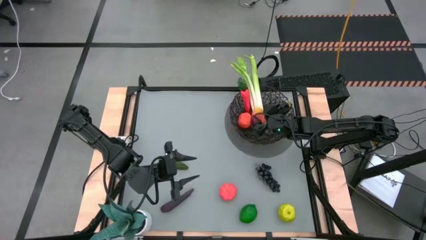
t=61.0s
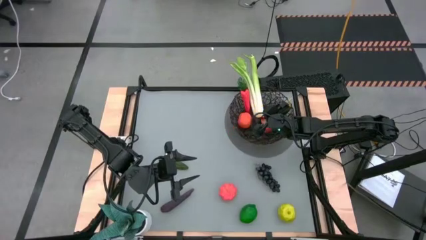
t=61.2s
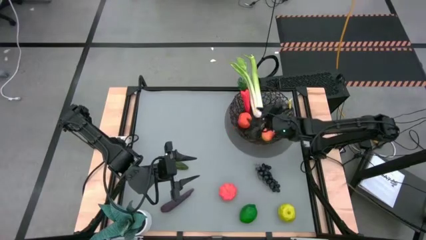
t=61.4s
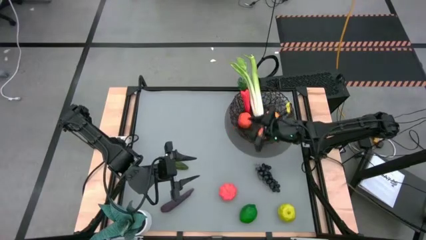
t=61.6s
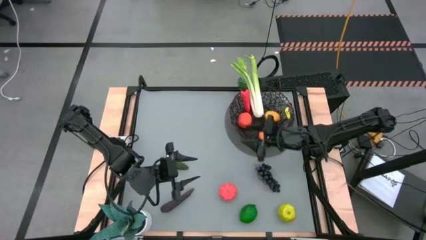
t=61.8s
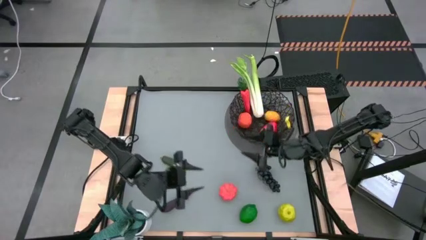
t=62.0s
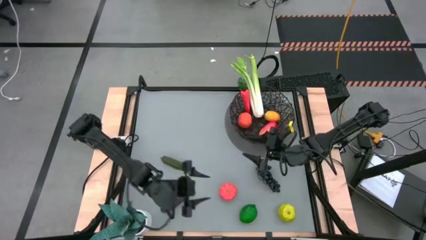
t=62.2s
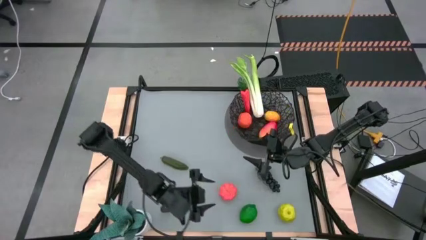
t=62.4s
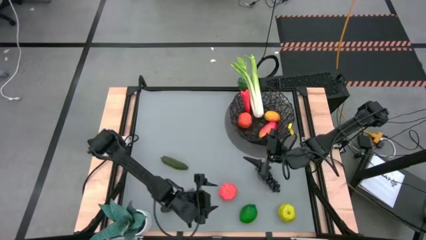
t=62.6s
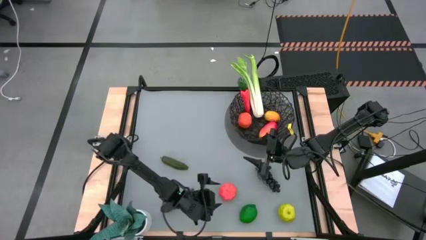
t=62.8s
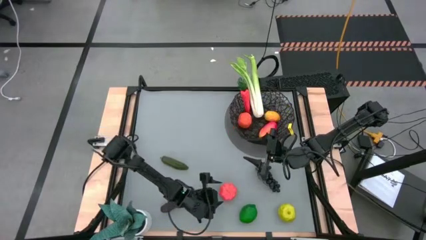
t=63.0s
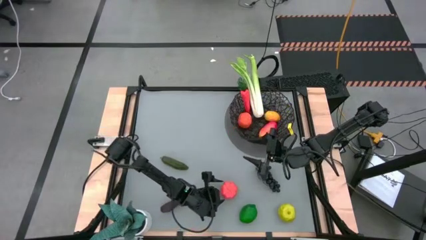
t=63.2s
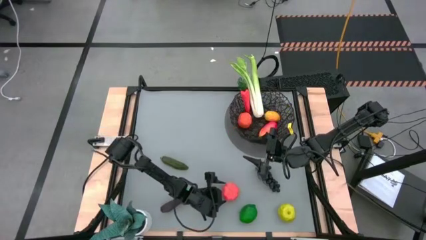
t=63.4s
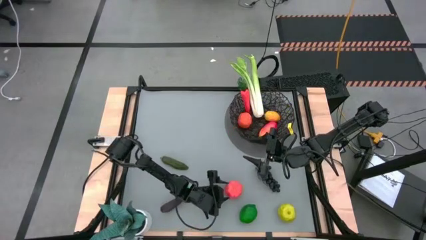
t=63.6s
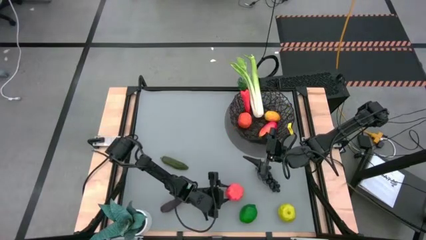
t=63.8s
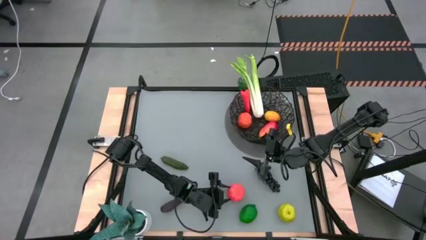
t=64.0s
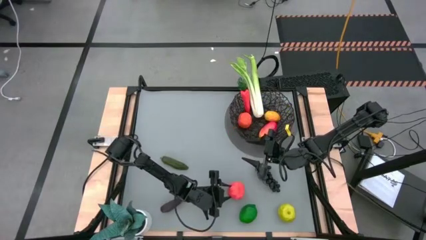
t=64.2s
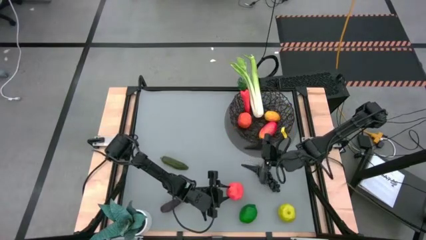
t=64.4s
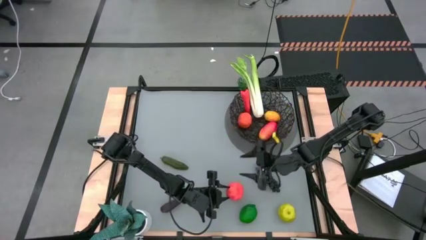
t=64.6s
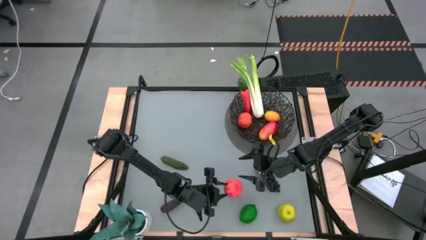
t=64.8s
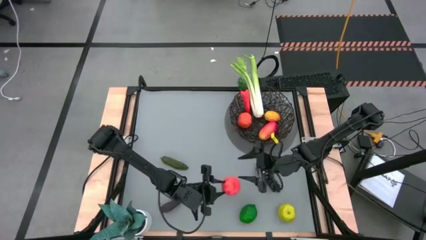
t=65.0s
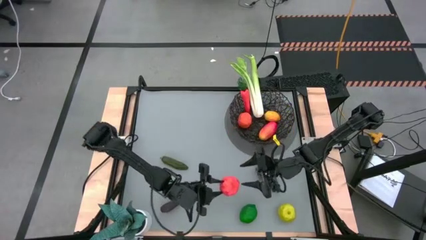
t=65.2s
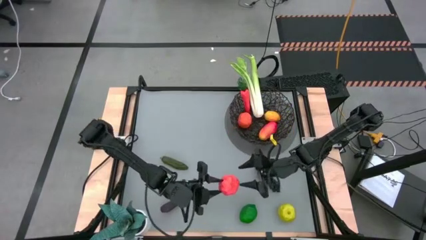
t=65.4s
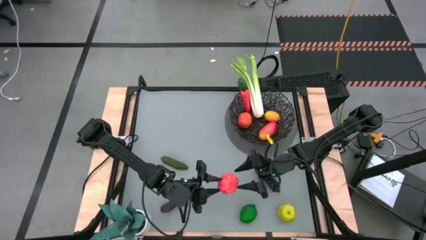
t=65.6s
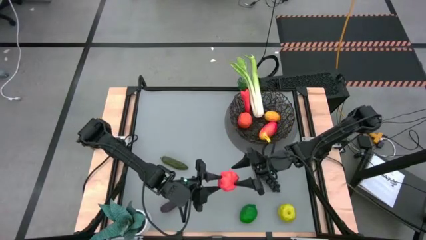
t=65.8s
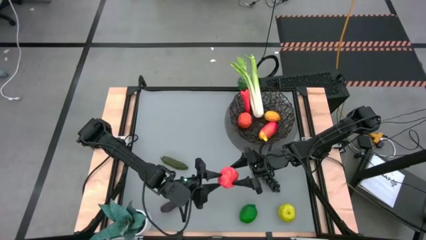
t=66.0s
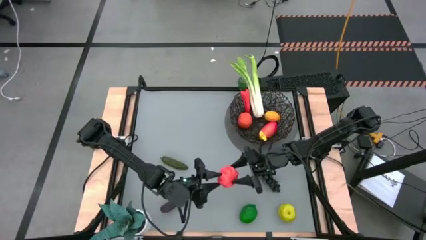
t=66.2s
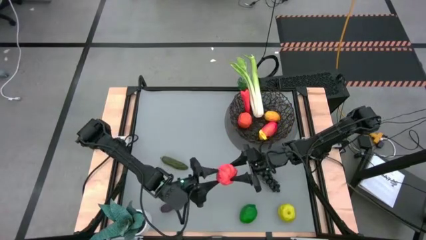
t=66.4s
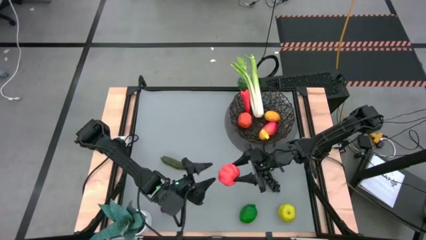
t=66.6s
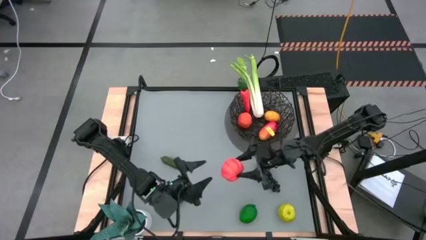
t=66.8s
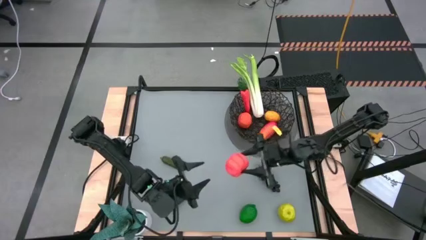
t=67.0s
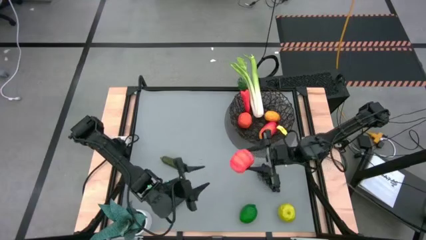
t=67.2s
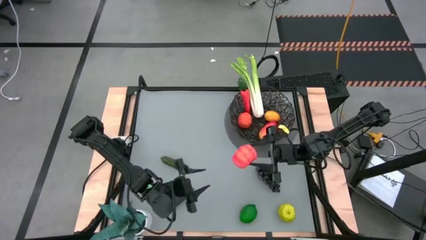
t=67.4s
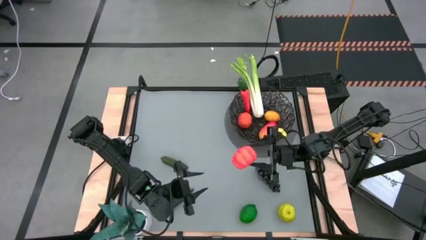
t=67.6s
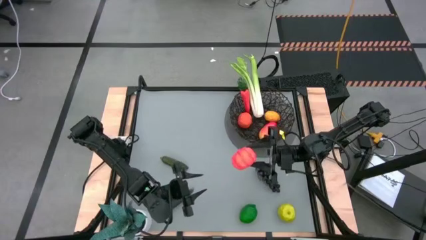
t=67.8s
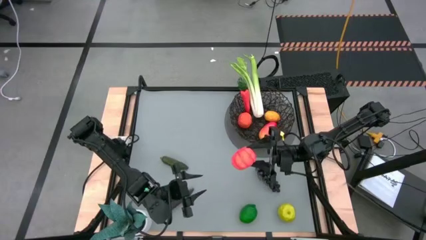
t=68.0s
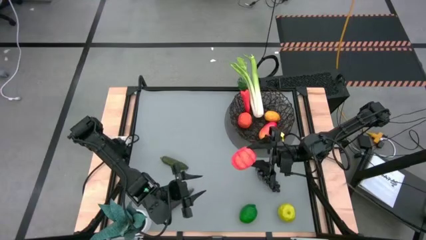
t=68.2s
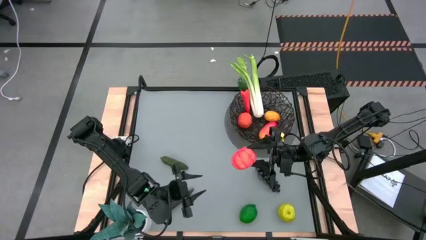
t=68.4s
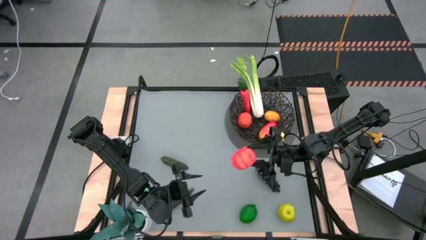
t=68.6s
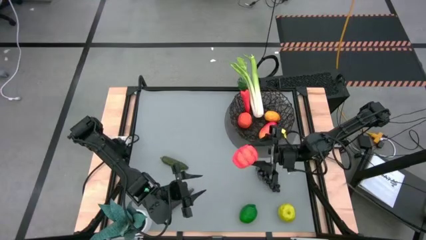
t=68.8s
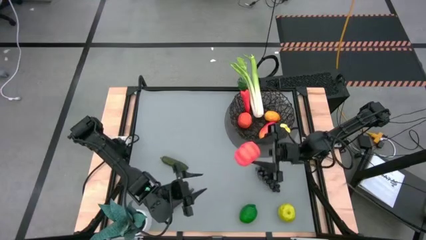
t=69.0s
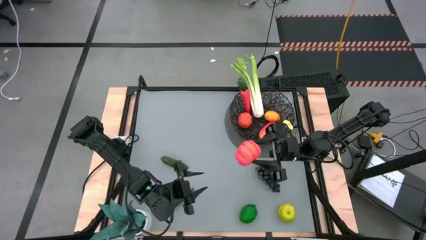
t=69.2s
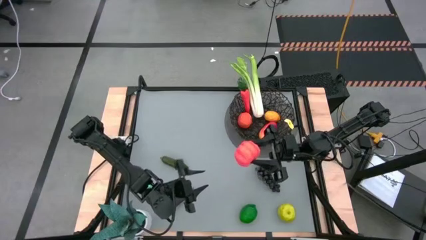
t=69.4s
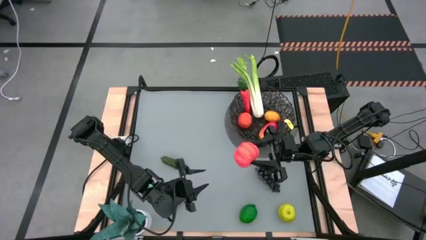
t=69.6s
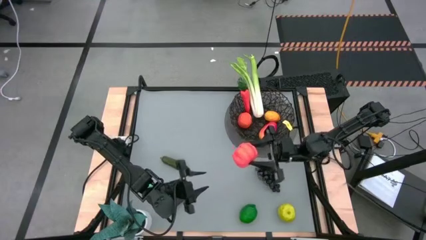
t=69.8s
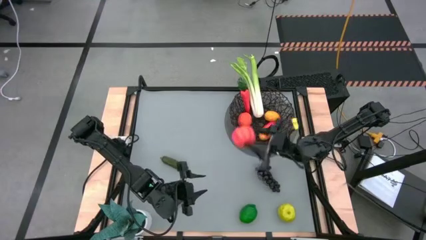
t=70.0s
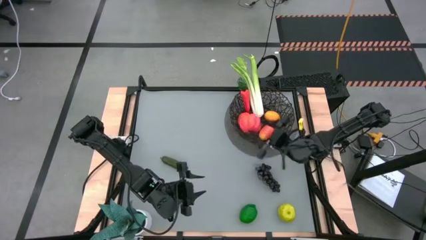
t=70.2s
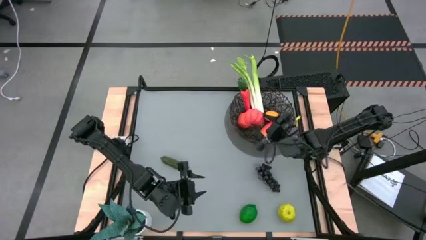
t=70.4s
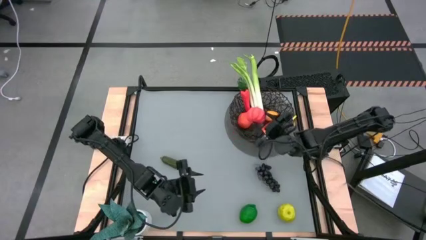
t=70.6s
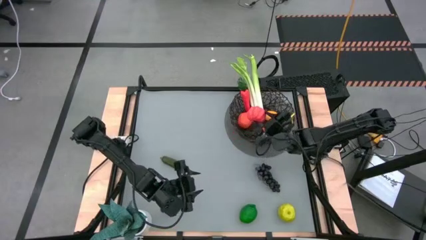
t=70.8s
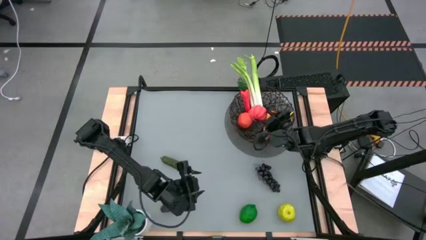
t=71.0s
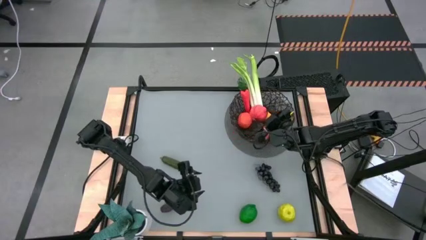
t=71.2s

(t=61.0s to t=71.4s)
Task: Build produce basket
Put the pumpkin into the black wire basket

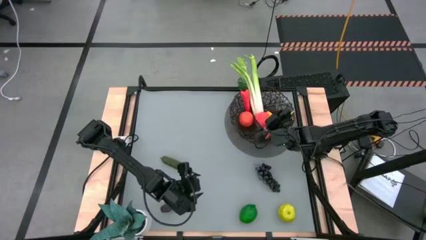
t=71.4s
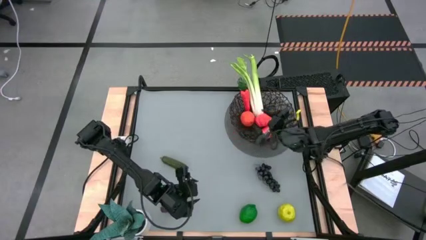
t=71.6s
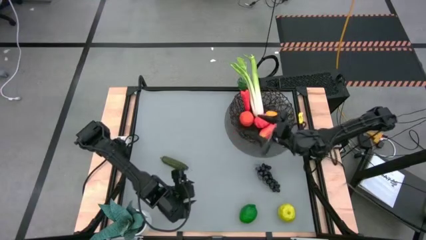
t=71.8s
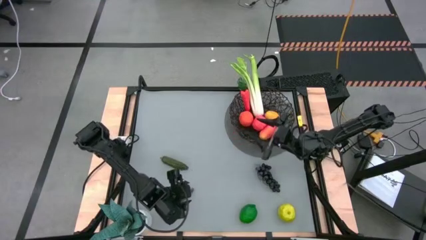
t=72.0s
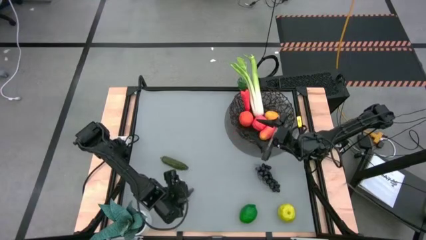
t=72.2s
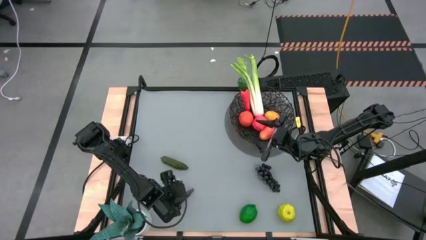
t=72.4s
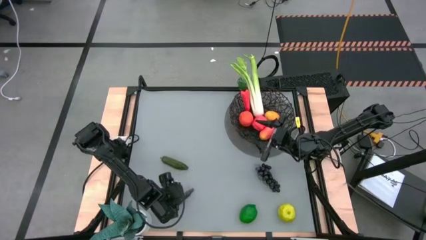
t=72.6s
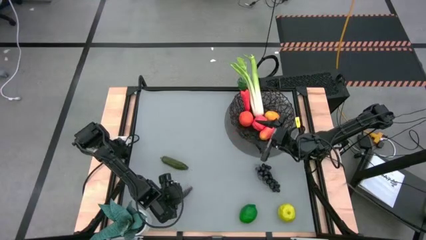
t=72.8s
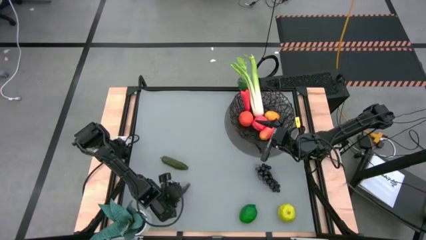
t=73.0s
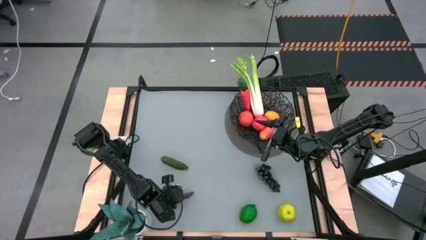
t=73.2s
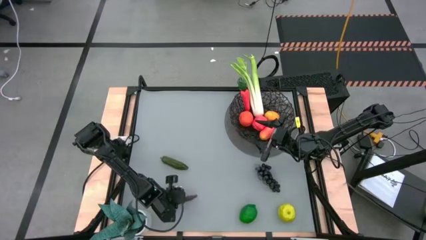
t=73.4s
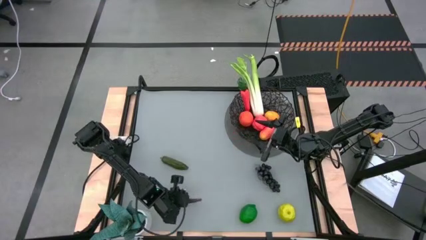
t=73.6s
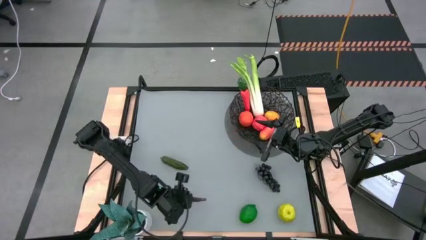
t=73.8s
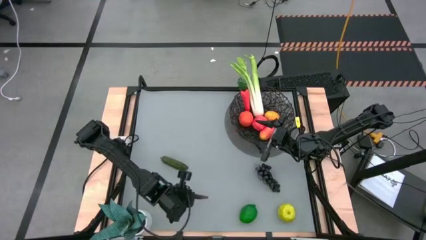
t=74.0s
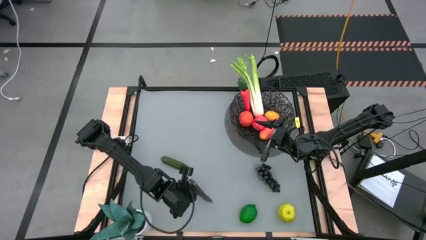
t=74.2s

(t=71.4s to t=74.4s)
Put the eggplant into the black wire basket

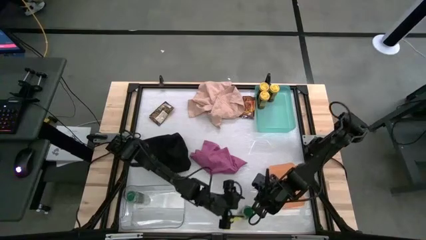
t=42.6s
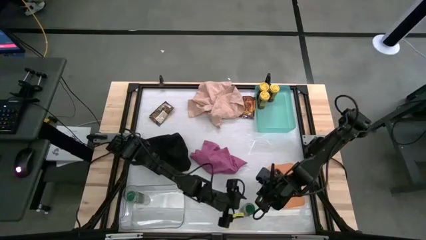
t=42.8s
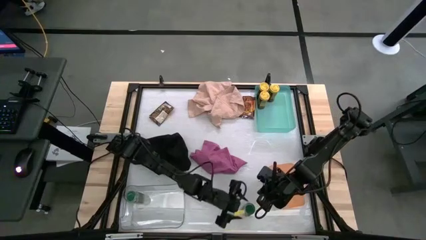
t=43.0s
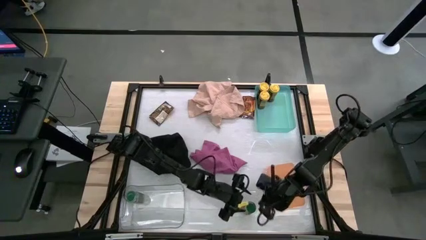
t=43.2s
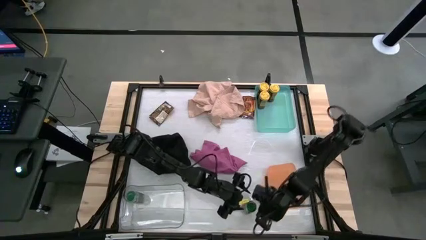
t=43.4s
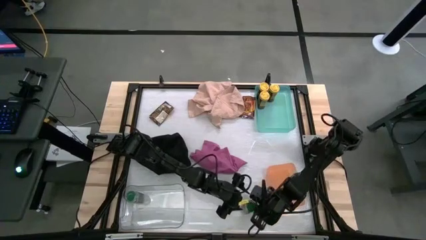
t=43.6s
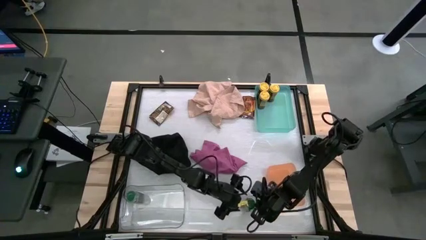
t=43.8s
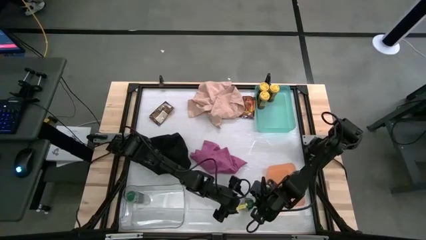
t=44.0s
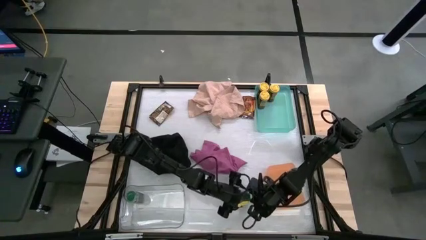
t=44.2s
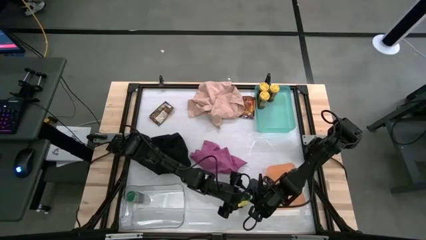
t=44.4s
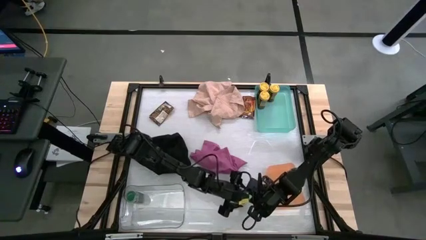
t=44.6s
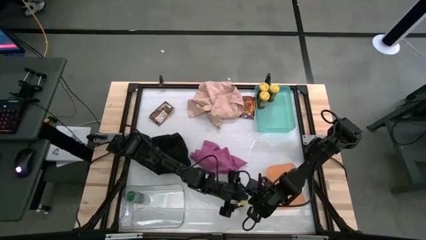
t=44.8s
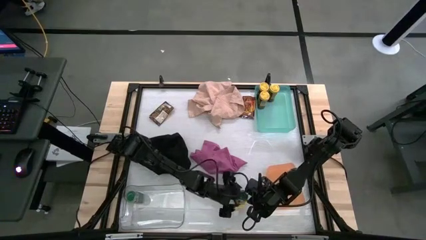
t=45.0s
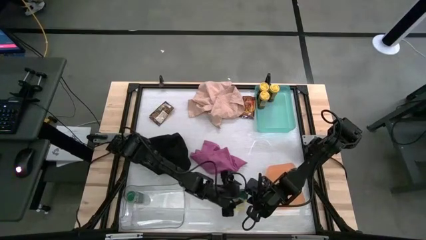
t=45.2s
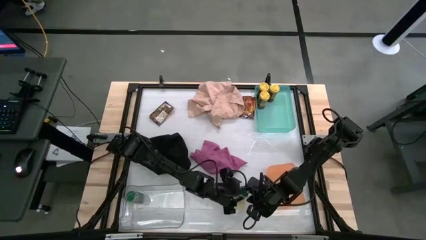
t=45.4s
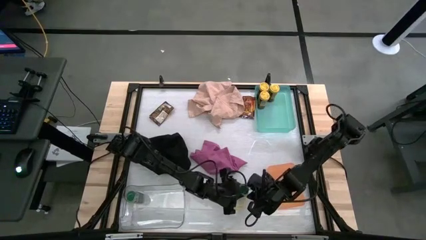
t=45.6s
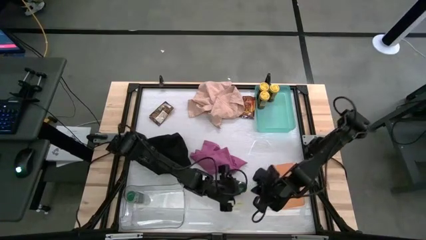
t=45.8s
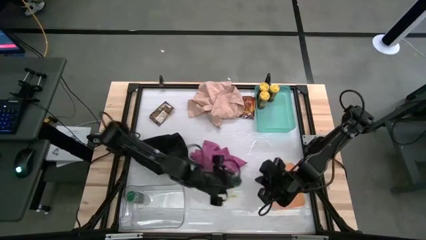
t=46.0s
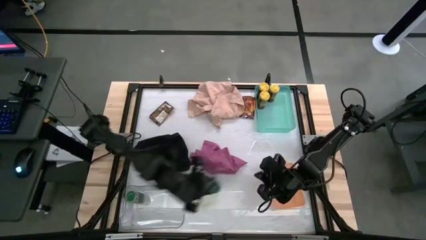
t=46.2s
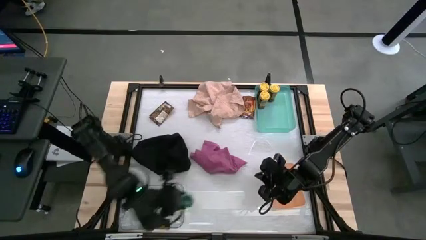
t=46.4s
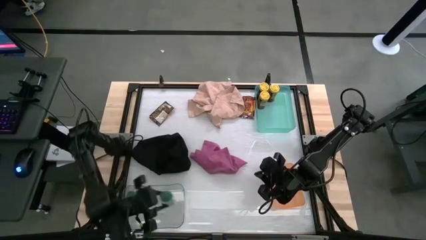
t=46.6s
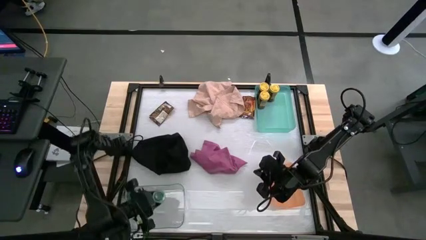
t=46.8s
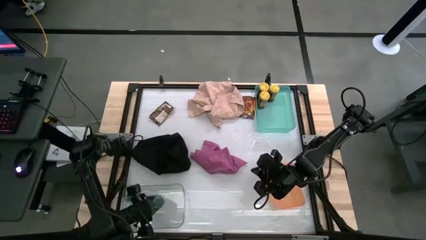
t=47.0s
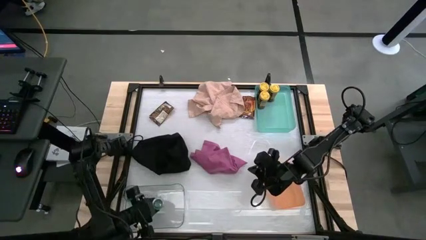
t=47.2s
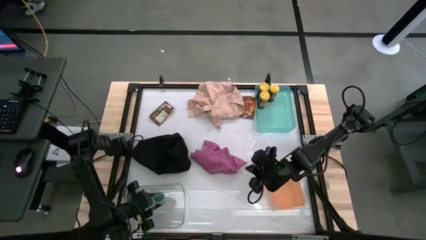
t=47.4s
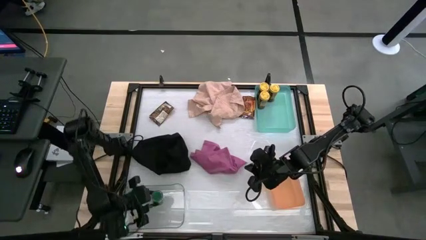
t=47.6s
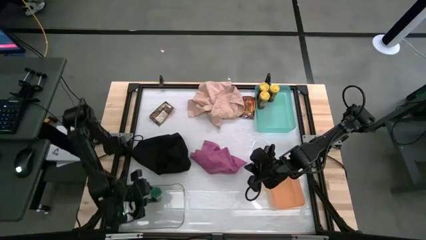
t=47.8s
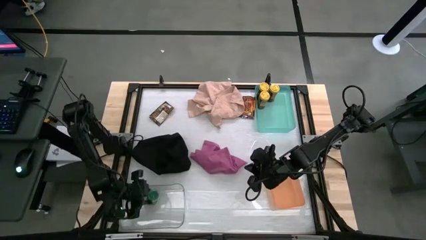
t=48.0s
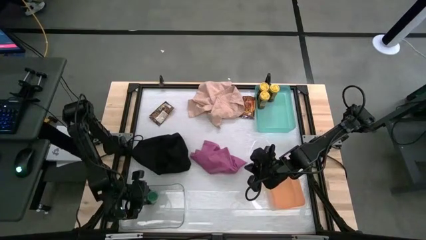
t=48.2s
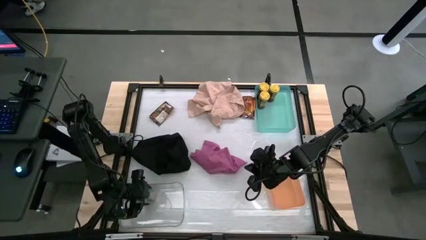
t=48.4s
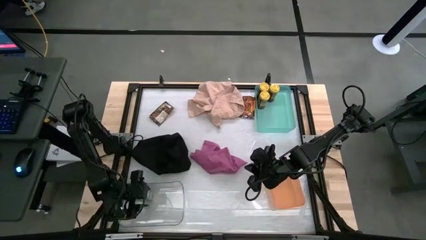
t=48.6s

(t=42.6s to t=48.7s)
Task: Sort spices by type
Put the green seasoning bottle into the transparent bin
